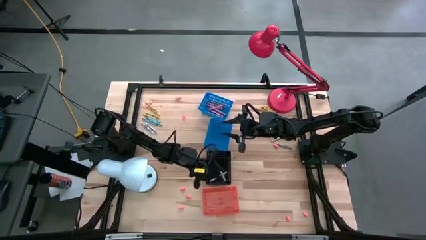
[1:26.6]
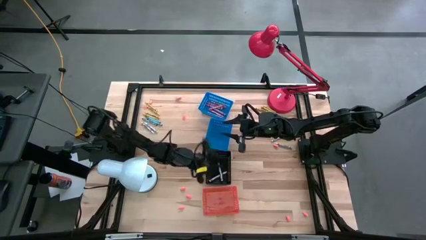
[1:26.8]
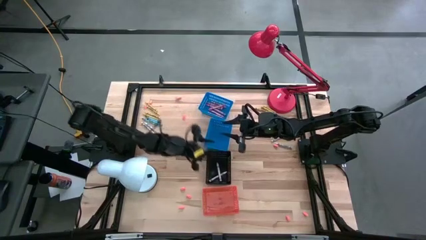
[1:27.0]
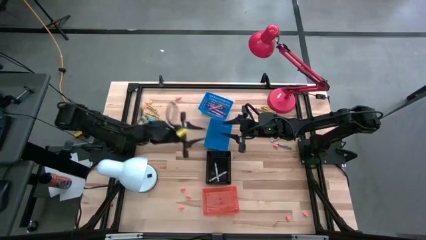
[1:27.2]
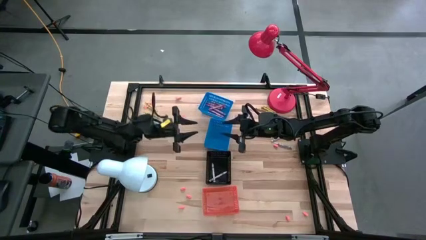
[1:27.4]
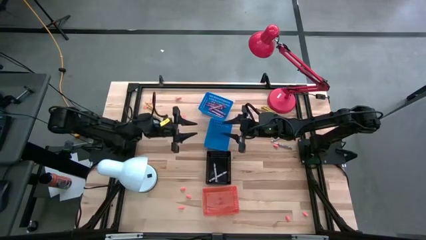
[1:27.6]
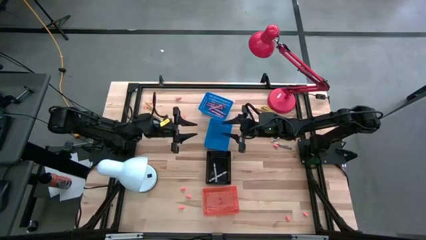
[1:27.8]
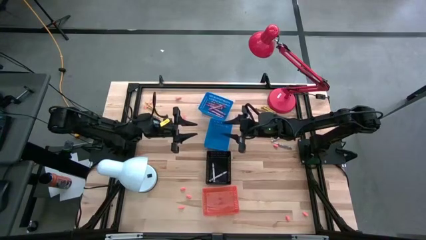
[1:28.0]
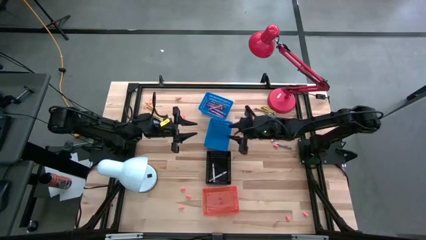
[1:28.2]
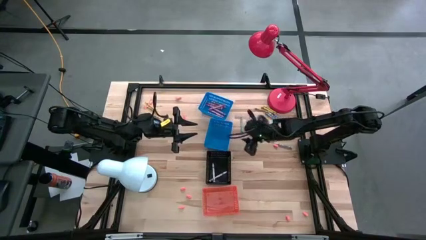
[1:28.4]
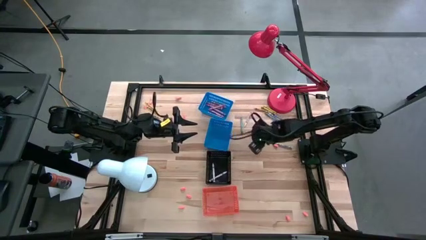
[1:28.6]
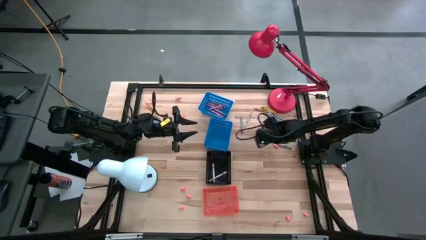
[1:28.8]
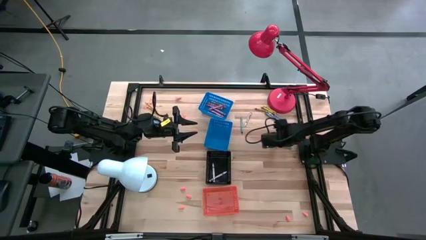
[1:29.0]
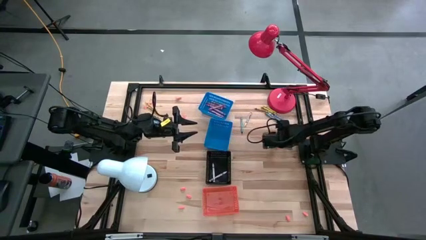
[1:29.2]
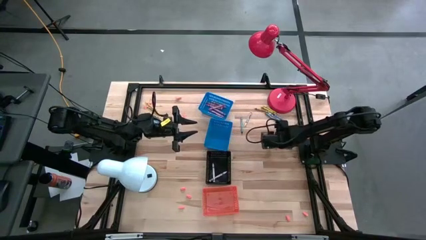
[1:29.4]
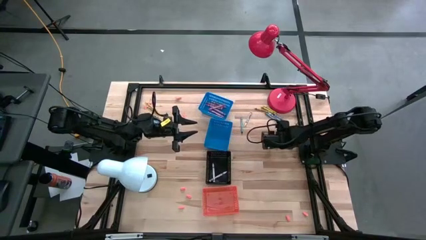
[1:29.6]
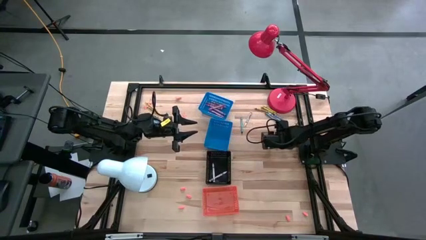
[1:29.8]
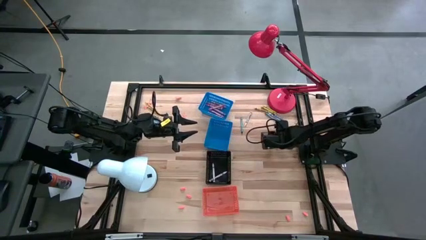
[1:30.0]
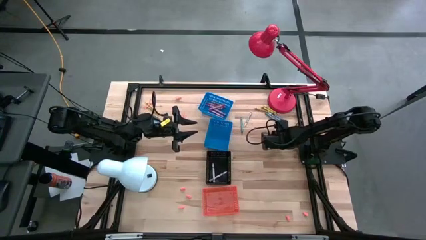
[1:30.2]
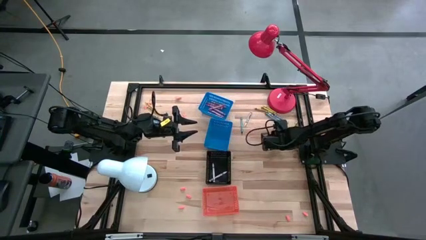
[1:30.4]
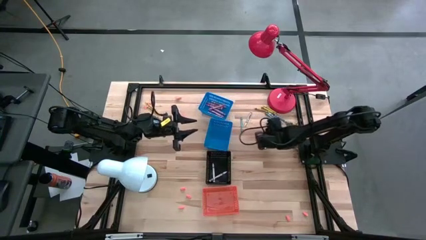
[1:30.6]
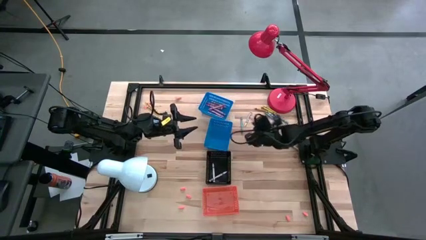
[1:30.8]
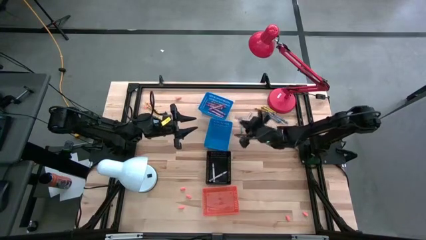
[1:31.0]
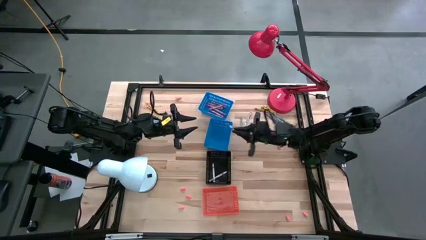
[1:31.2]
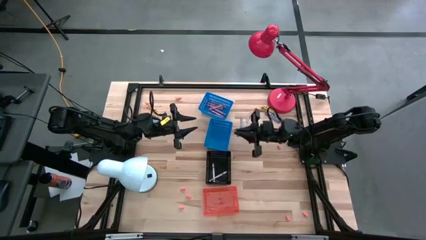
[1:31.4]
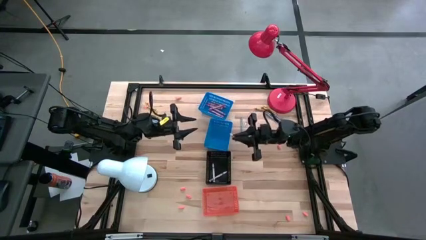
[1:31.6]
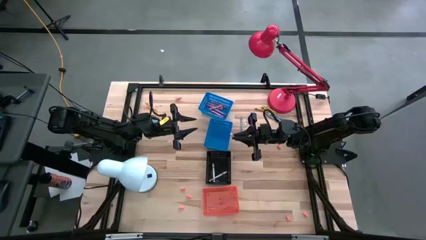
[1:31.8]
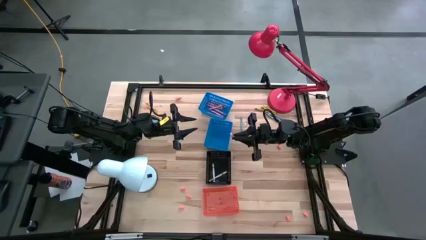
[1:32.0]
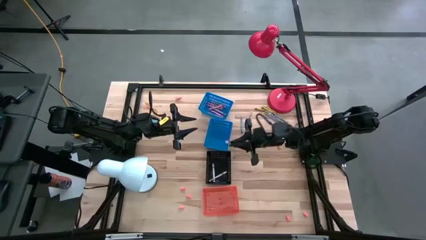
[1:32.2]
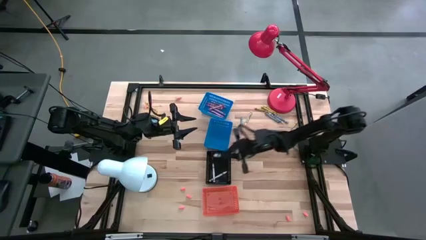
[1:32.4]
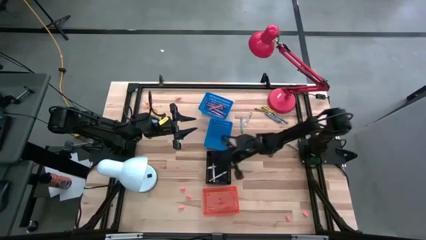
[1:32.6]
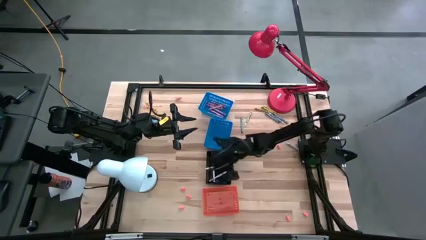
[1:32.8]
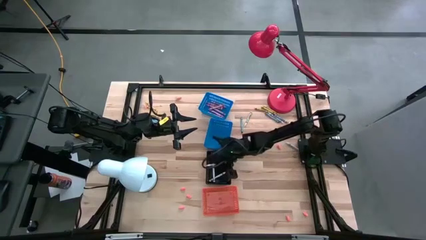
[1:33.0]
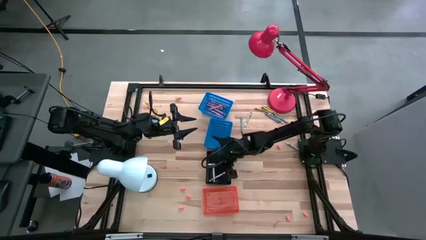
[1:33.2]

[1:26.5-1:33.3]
Task: Sort crayons
Put the white crayon into the black bin

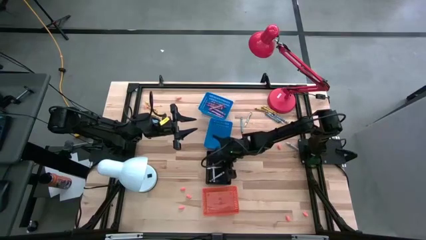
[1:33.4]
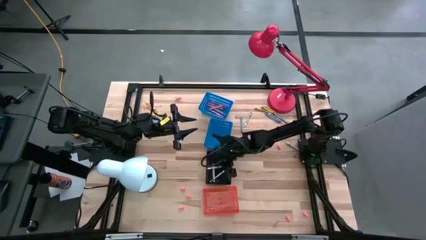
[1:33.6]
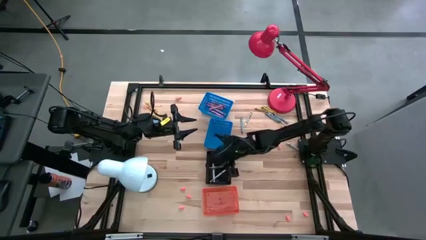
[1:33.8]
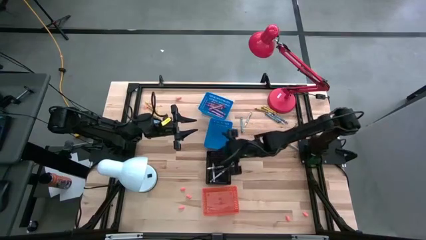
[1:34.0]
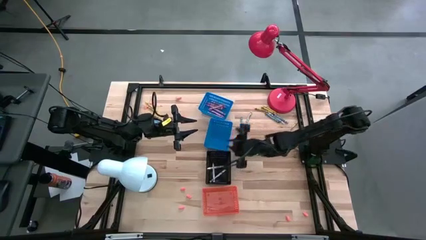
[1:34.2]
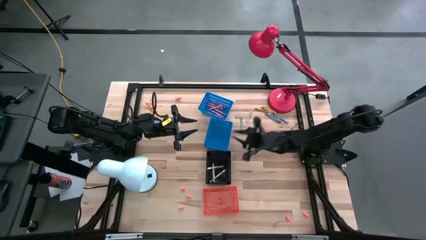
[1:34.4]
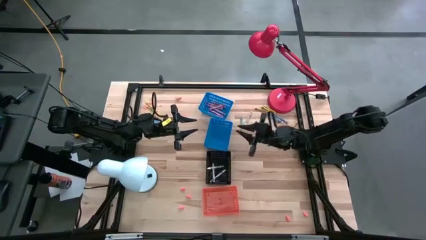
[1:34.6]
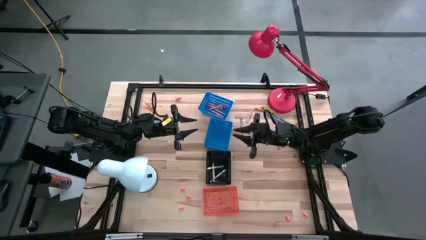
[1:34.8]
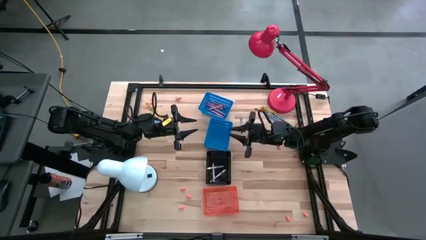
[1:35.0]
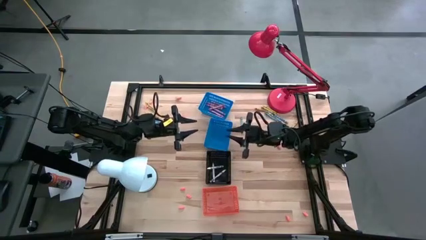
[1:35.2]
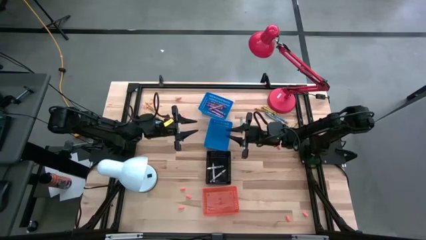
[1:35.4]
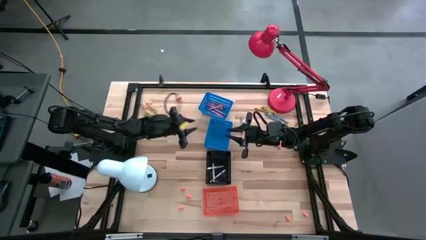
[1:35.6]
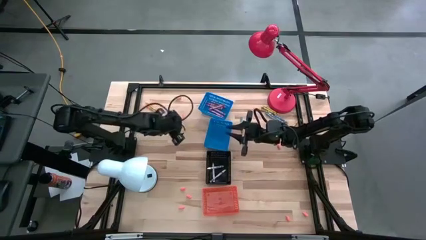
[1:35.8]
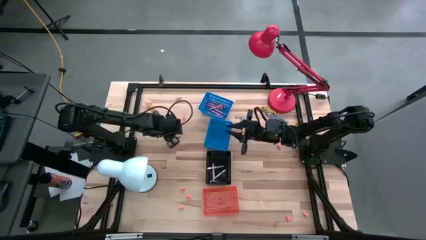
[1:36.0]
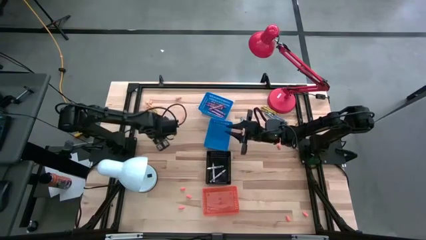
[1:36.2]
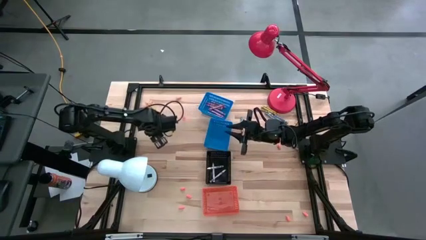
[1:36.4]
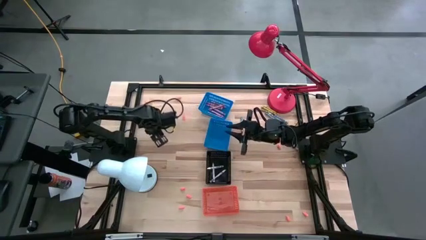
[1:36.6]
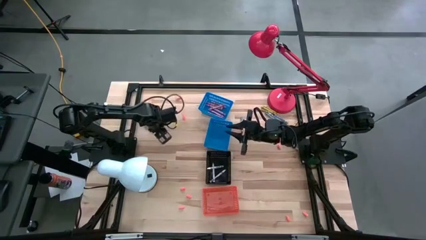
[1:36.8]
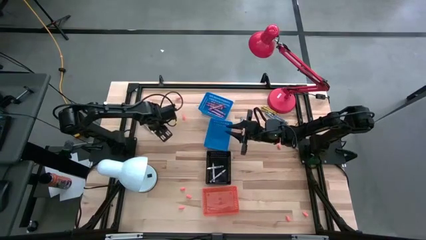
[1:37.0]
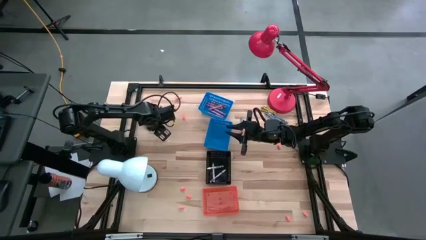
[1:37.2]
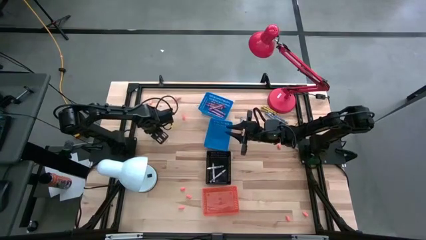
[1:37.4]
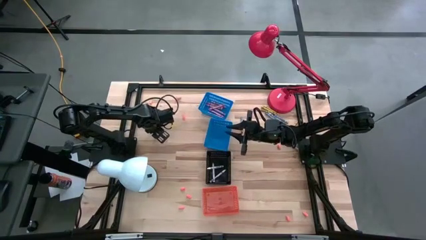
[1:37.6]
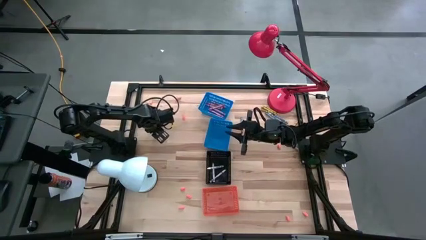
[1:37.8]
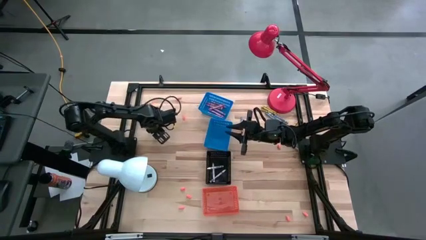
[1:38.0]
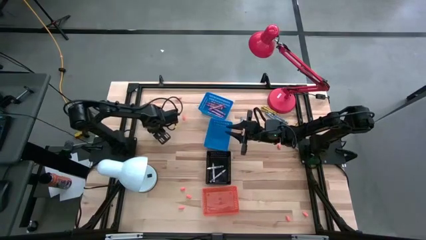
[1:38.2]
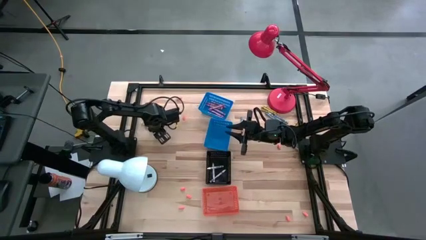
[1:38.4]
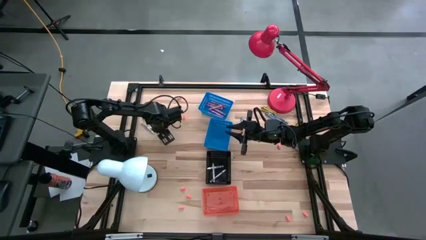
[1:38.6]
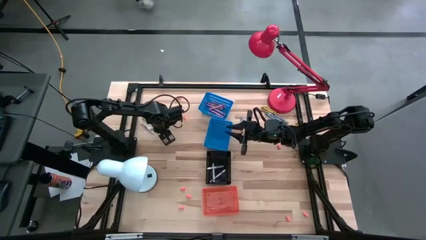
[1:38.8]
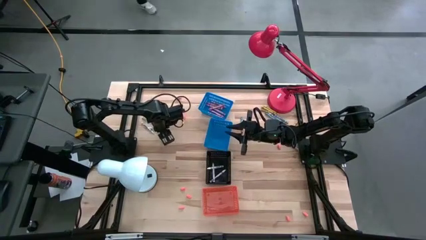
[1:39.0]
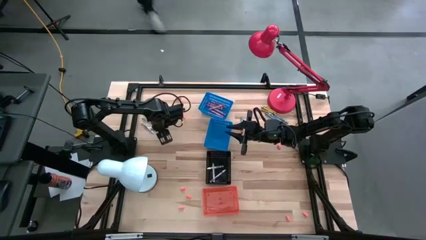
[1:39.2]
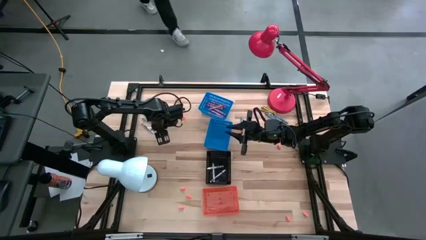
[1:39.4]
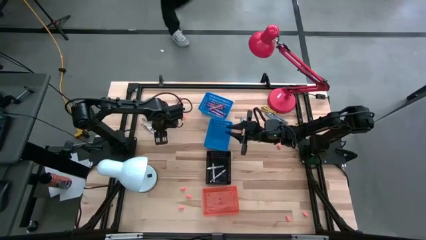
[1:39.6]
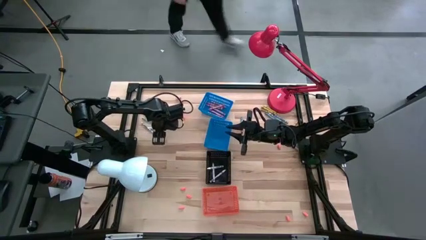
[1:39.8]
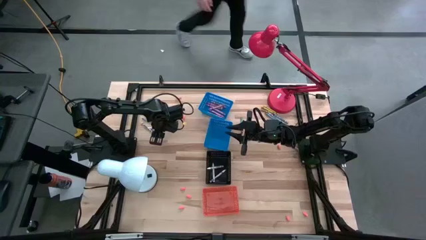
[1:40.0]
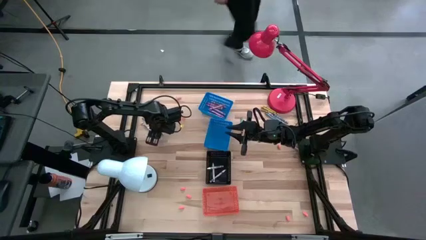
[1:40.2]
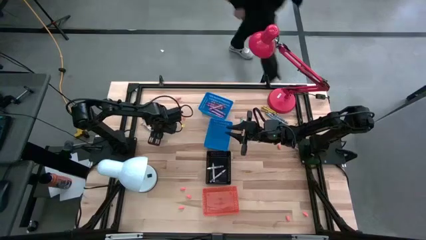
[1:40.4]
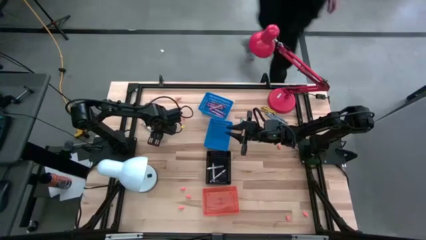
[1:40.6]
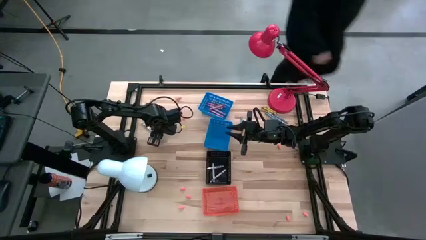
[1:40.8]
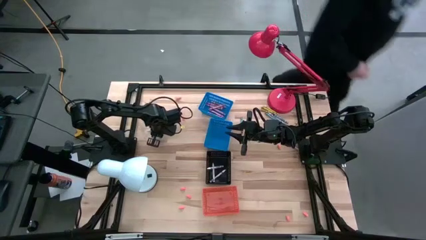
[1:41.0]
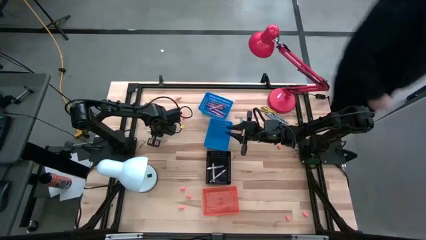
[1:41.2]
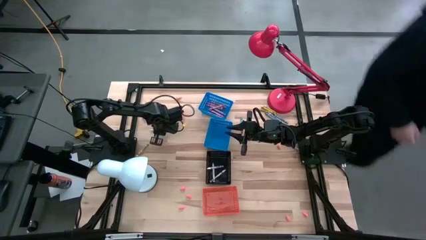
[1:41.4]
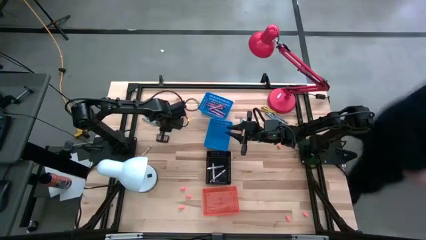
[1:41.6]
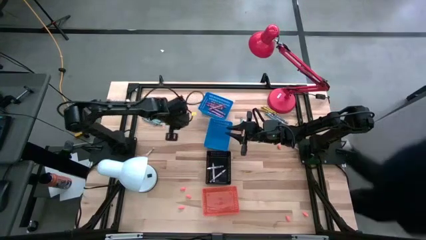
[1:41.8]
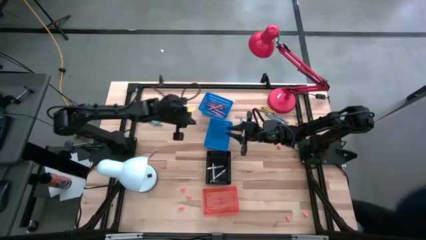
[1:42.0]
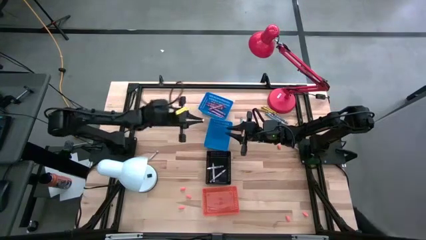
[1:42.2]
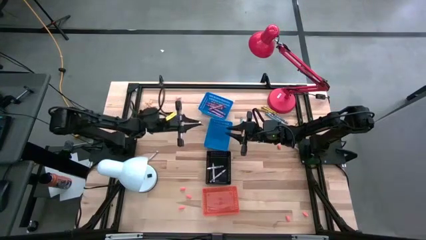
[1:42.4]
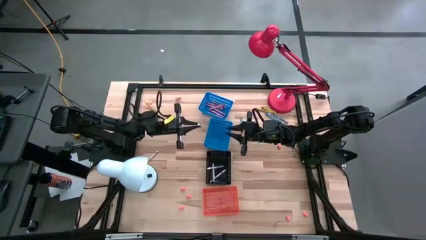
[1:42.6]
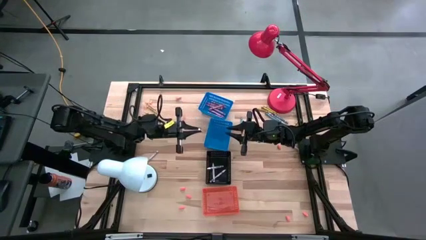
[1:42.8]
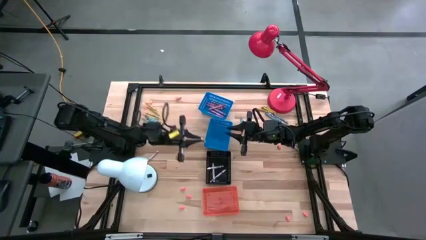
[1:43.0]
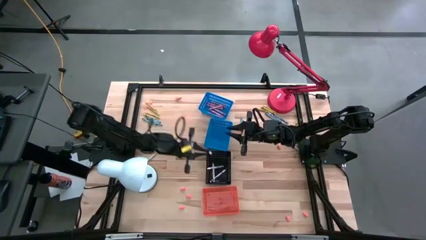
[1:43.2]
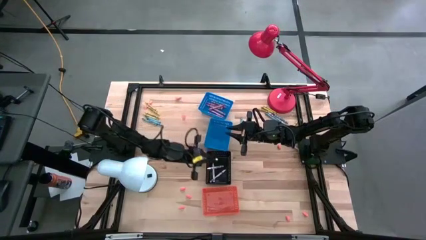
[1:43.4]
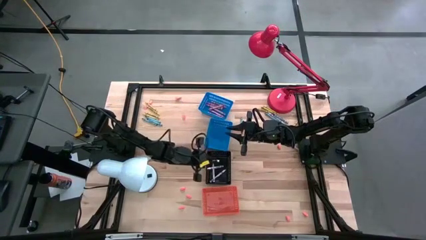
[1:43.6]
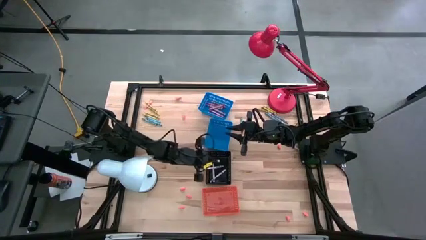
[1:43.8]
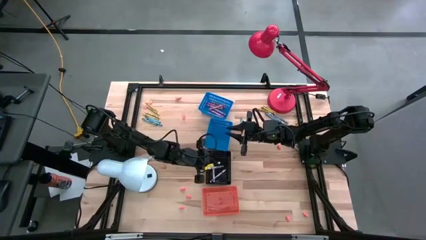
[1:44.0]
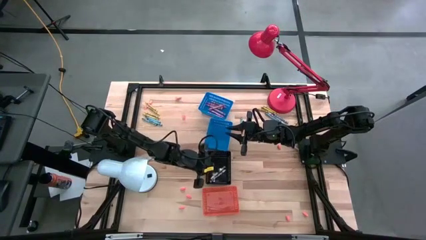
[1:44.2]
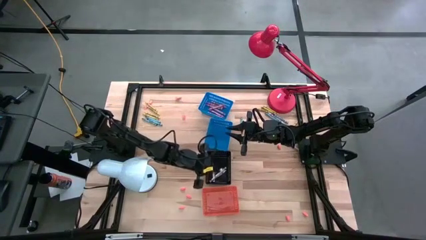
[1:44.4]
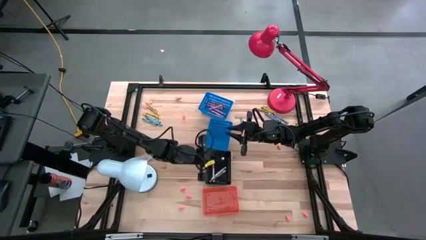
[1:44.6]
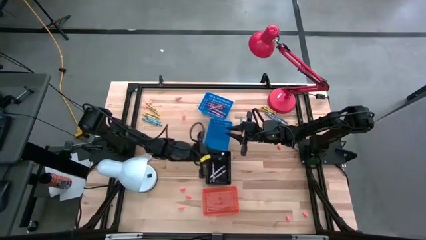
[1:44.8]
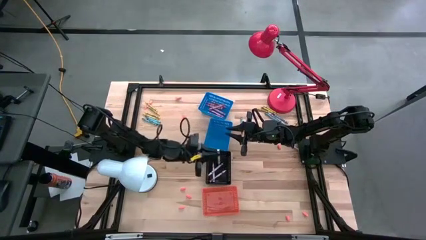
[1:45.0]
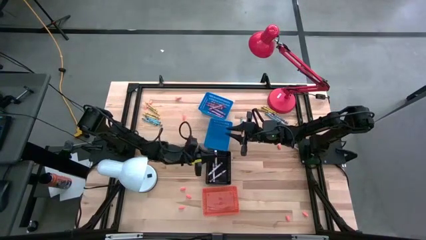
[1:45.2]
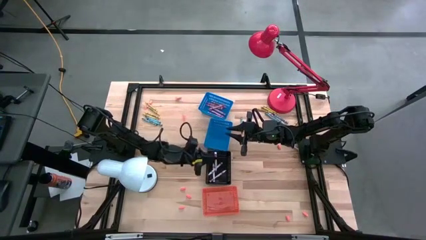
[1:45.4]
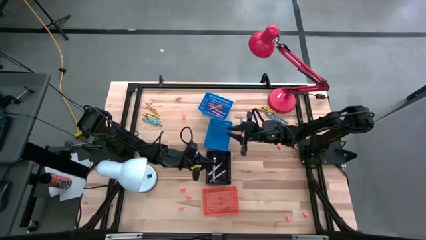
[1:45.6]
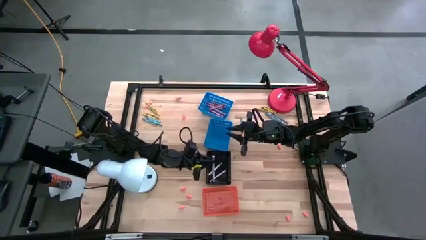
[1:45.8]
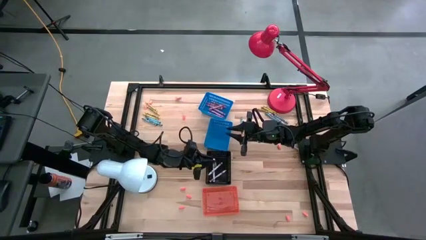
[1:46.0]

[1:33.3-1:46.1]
Put the white crayon into the black bin
